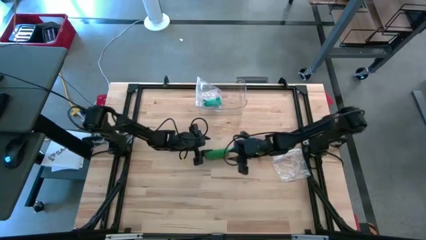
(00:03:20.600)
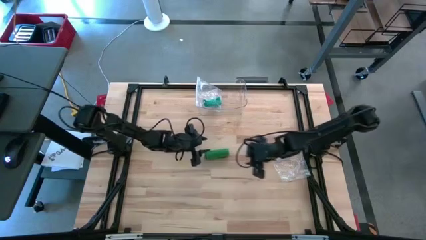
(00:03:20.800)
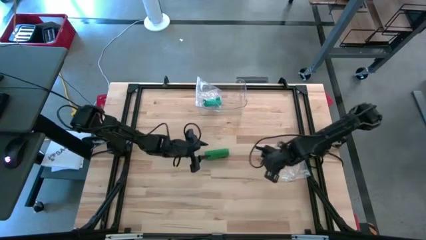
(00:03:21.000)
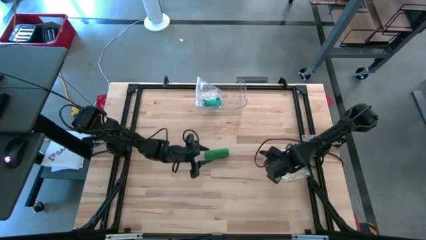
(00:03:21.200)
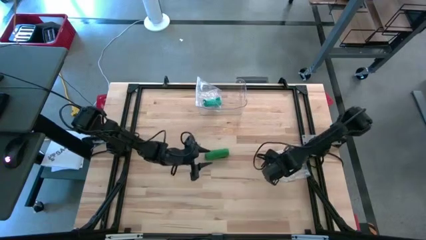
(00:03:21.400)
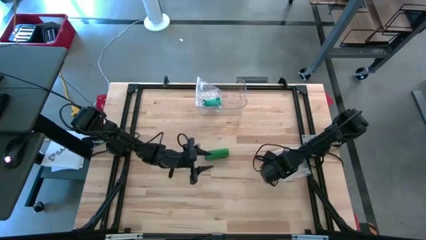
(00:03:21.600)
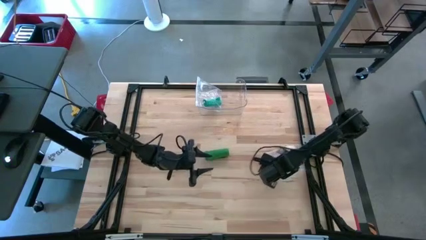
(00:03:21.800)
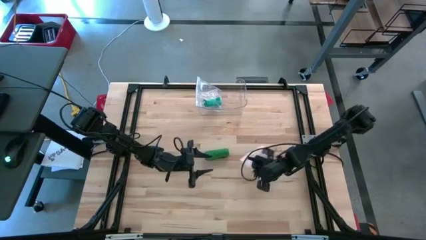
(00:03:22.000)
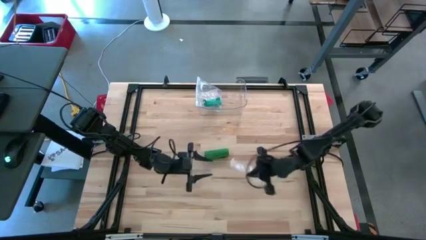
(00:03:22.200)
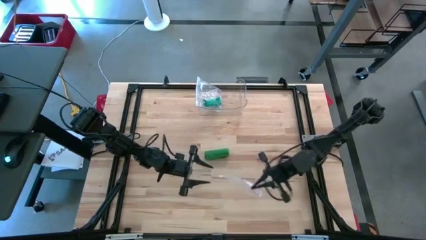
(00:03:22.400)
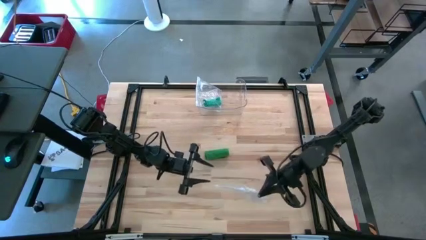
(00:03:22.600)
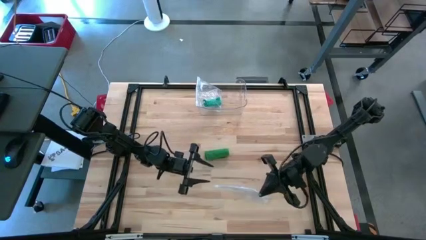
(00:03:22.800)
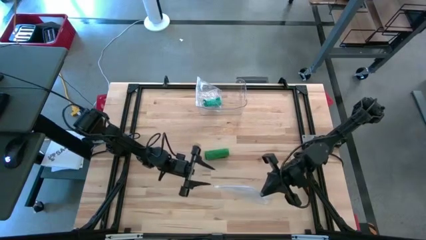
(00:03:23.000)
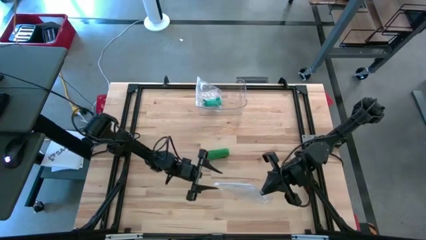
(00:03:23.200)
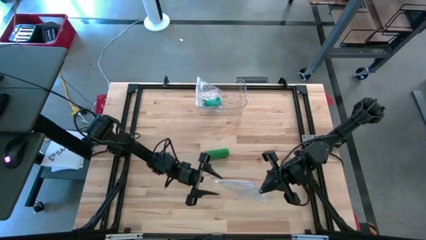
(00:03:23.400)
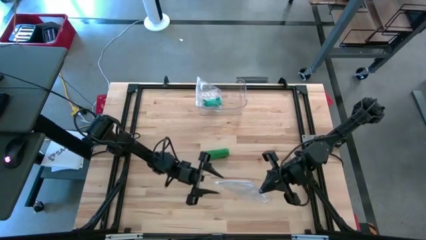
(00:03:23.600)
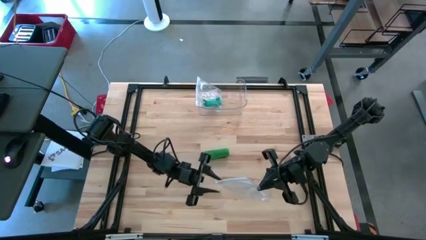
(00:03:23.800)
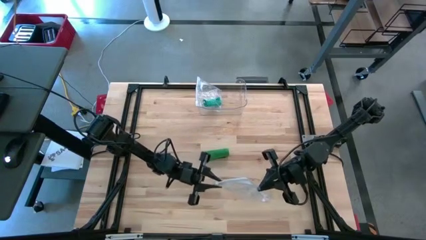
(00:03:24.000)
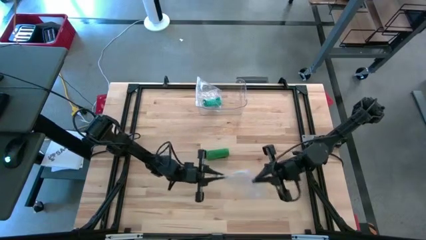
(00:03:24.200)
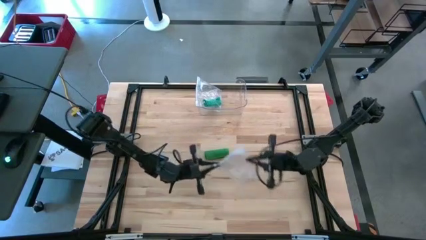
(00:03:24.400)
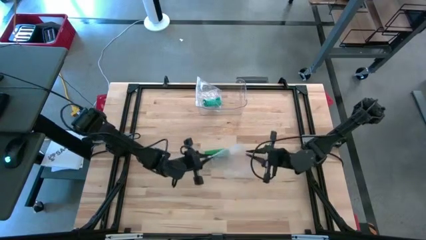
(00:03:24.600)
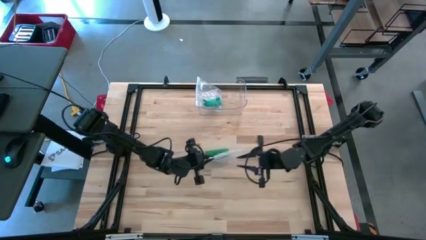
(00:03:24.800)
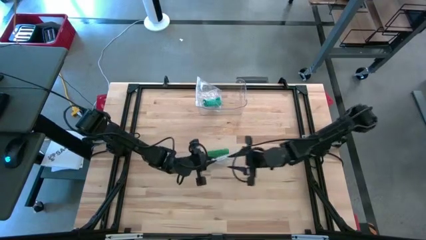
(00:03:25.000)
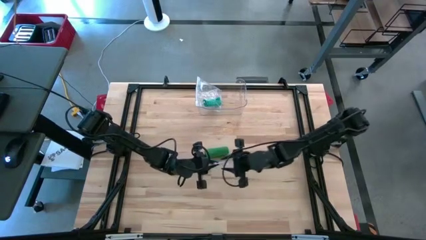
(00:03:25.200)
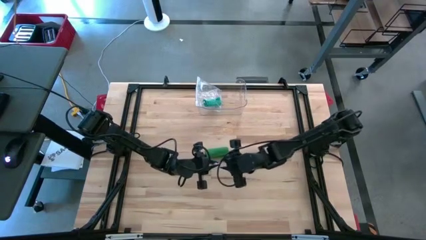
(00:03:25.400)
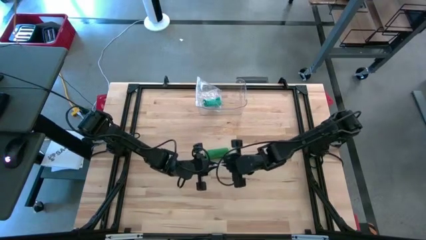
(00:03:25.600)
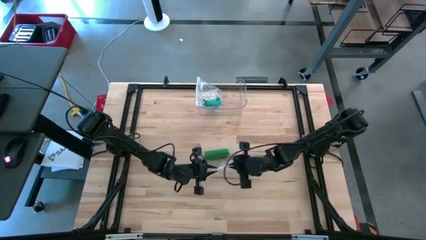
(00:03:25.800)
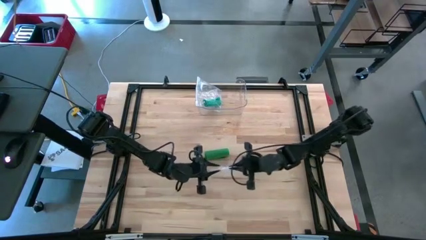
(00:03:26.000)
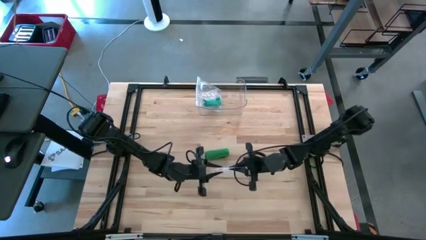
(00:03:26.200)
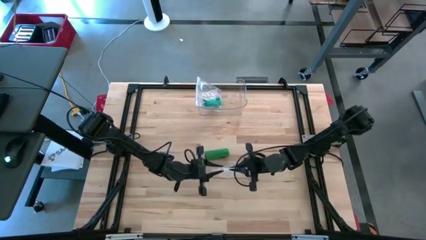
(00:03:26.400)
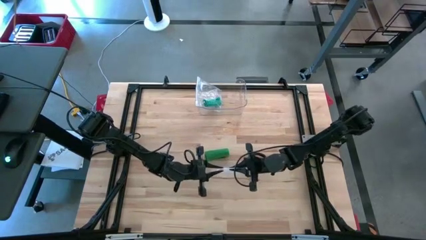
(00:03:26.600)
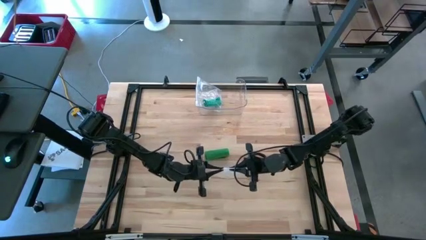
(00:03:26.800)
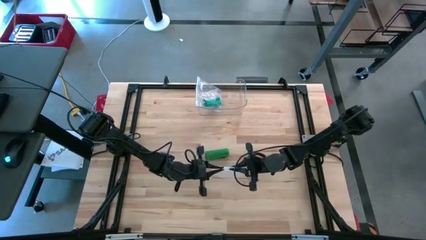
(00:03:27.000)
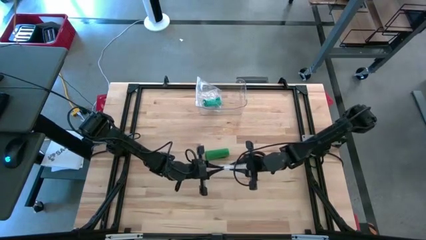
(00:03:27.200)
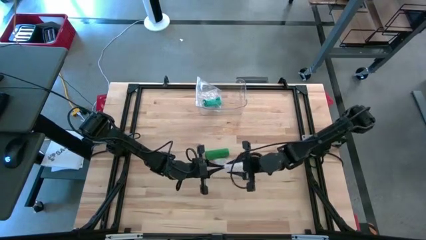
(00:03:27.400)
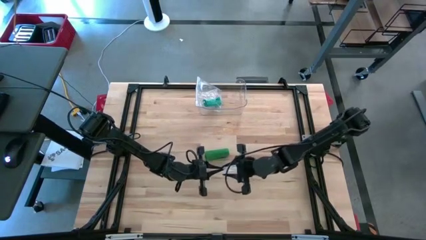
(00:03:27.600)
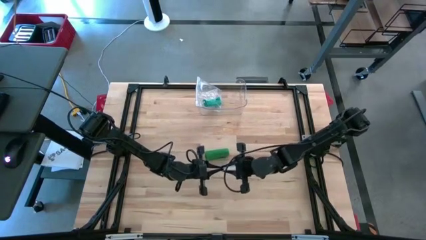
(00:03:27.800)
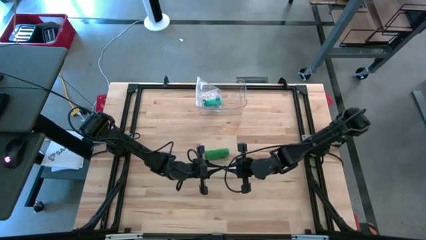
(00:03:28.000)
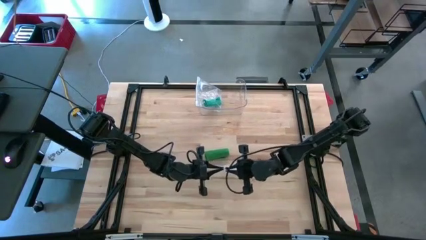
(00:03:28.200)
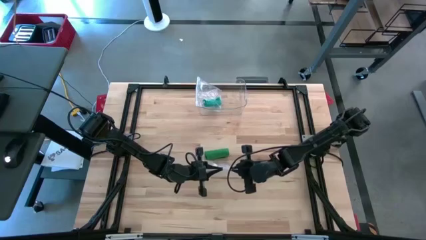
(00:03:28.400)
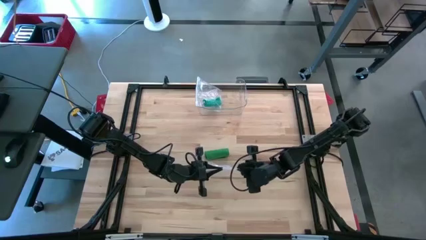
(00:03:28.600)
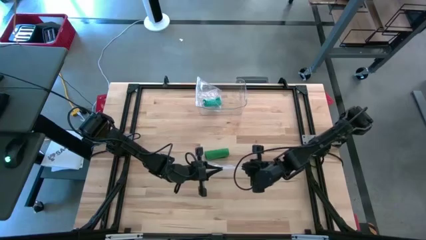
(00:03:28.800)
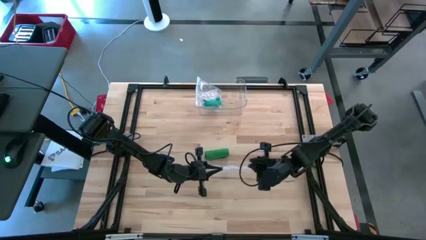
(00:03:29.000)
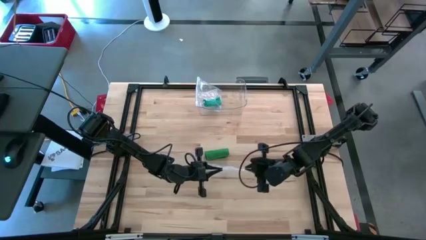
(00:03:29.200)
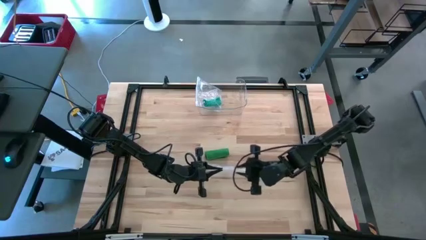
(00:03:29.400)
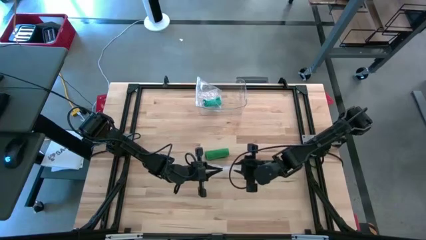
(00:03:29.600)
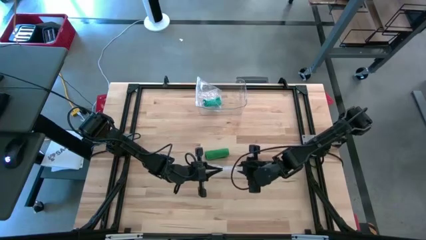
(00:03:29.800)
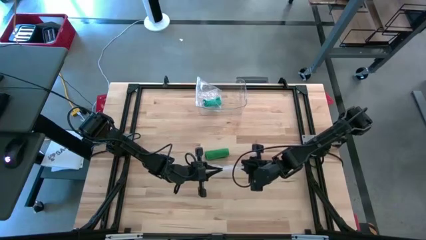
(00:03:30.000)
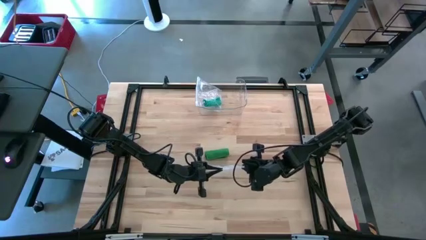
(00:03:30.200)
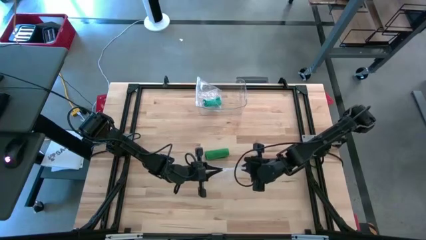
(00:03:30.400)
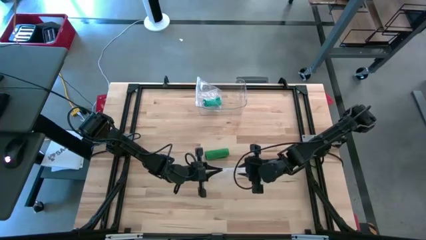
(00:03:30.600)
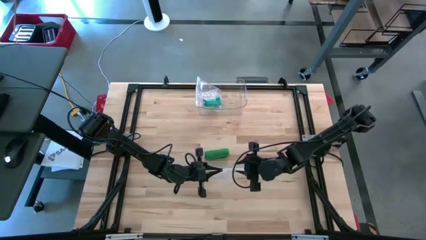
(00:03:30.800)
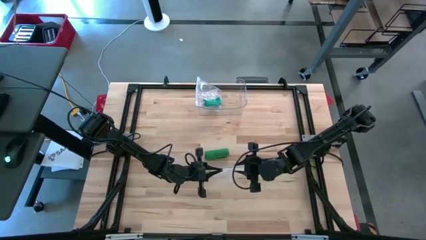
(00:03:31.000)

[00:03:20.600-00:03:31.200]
Task: Roll bandage
Open the zip bag

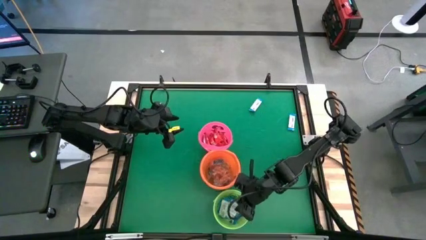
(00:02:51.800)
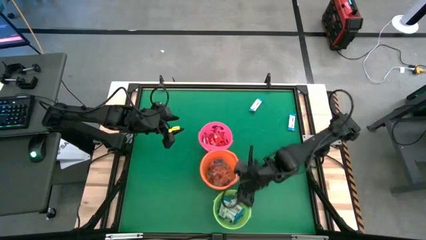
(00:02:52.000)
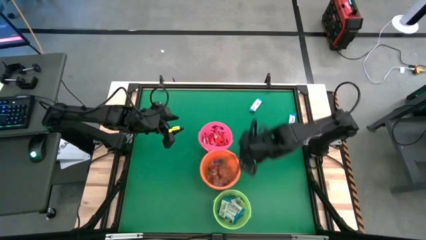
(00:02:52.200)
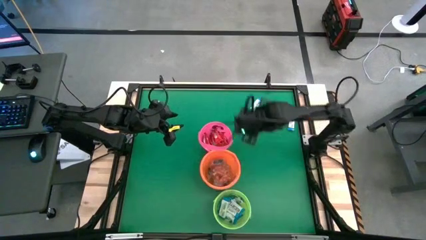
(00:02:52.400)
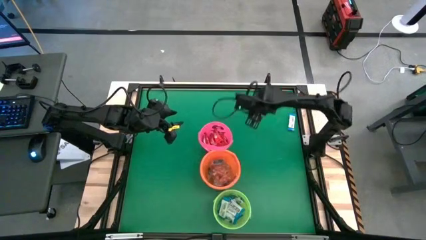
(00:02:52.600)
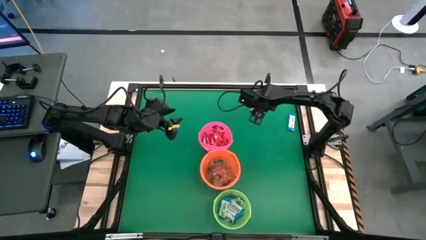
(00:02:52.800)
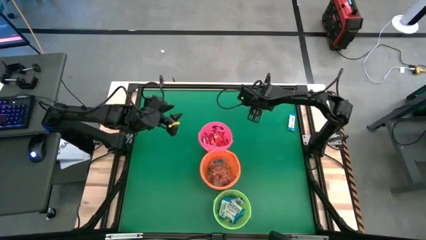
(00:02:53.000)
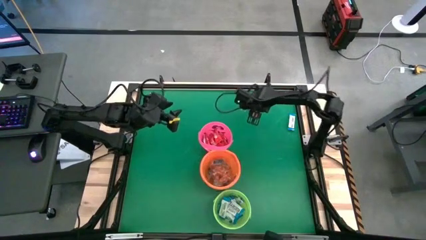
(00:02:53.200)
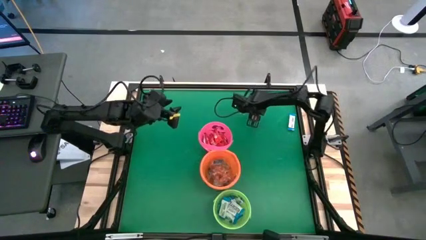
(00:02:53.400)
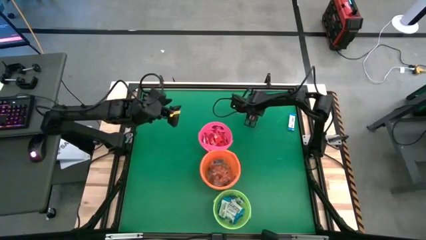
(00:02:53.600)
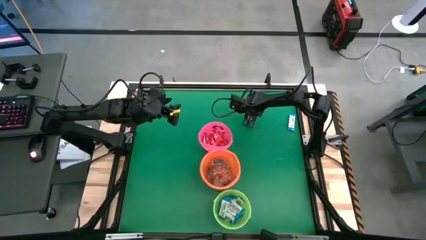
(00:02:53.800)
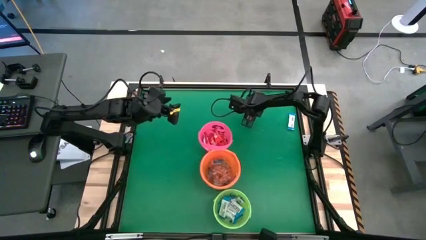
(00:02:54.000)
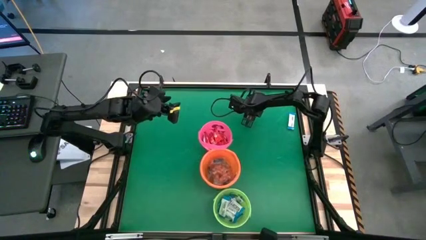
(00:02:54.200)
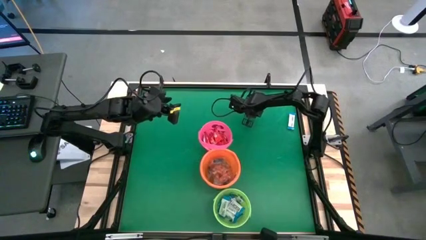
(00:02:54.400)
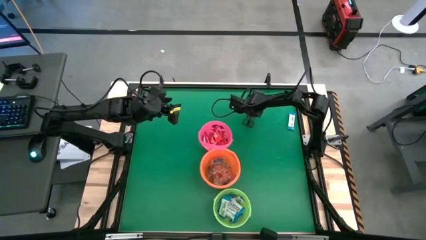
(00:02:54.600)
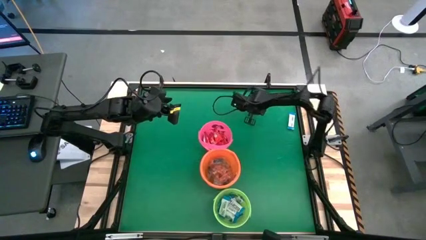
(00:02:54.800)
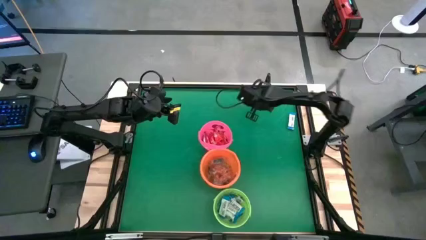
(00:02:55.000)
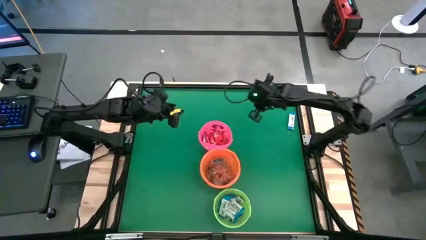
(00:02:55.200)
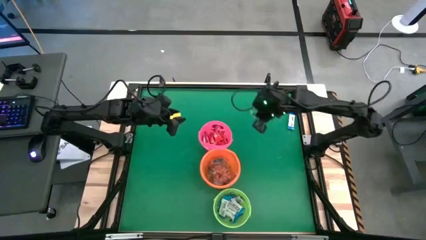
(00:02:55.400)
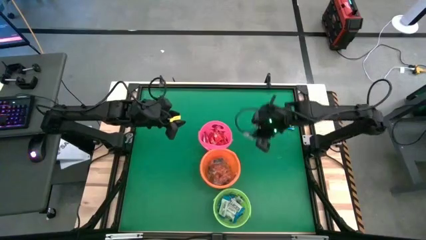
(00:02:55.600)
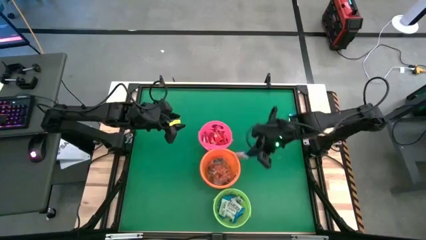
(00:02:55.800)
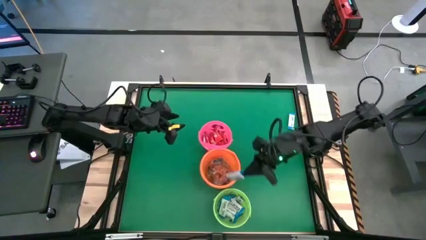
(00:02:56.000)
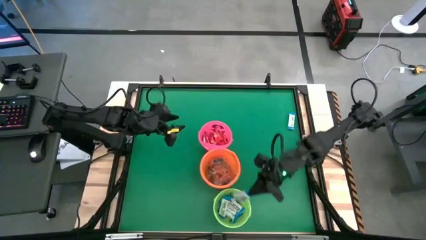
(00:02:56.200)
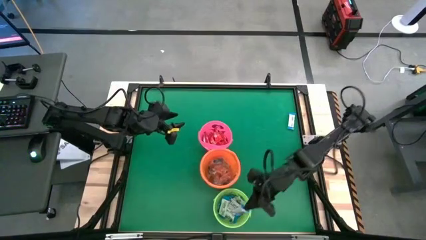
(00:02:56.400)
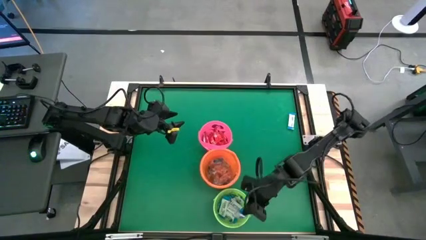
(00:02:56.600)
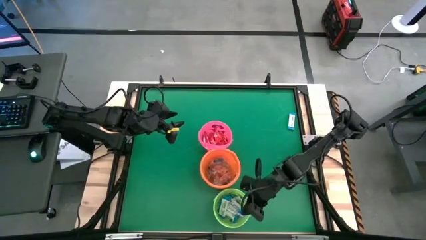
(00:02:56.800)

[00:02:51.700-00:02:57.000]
Task: Sort candy by brand, put in halloween buckets
Put the white chocolate into the green bucket
